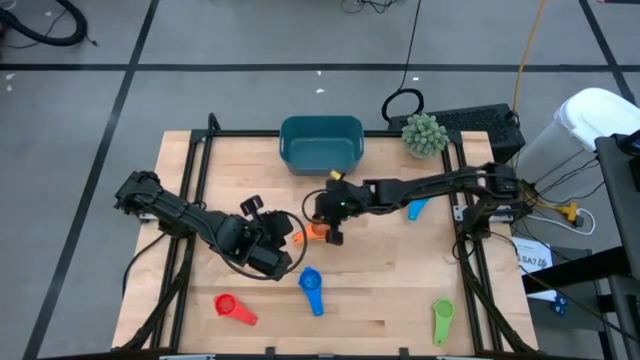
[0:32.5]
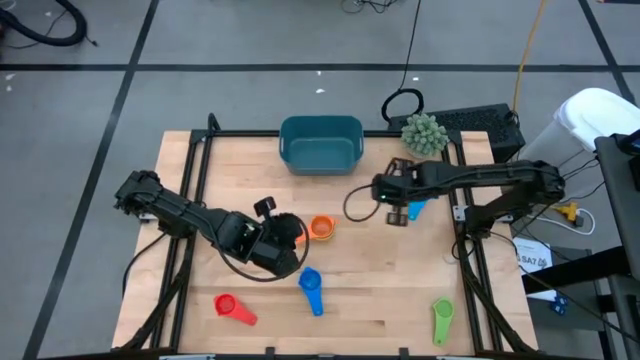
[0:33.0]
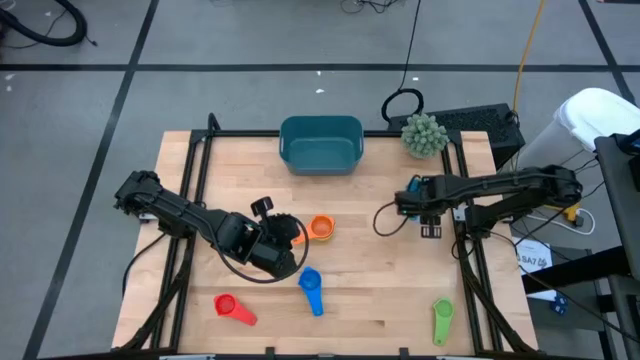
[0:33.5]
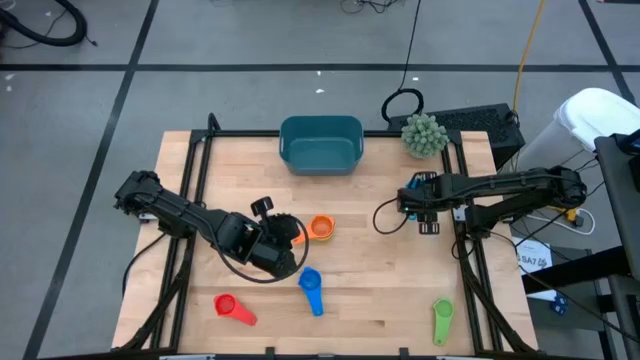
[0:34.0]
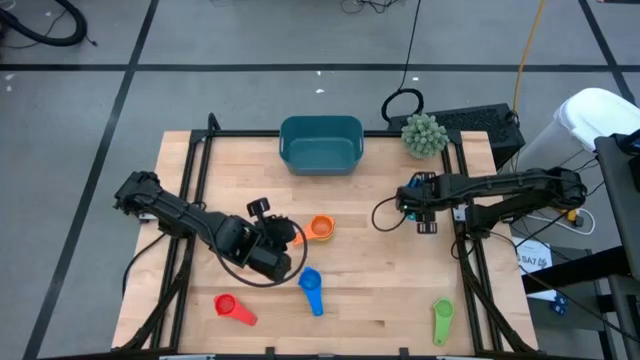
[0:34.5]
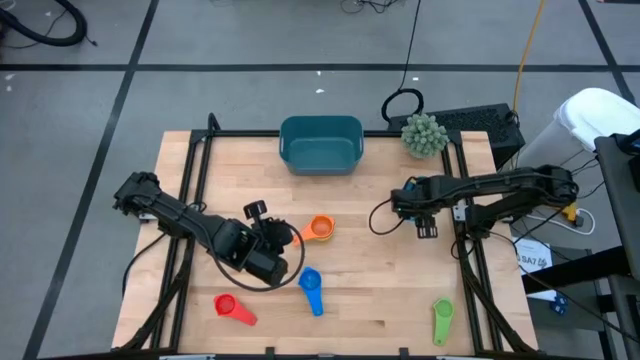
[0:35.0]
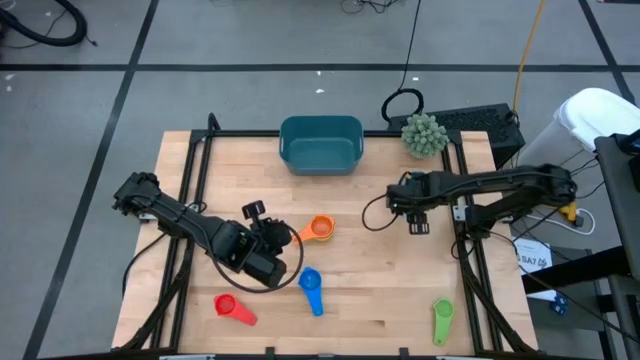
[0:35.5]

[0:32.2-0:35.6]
Task: Nest measuring cups in basket
Move the light blue measuring cup to the center of the table

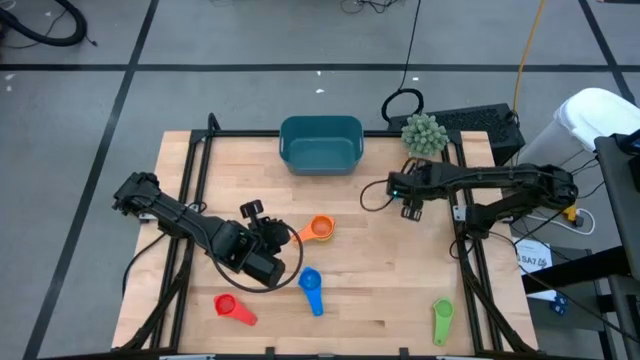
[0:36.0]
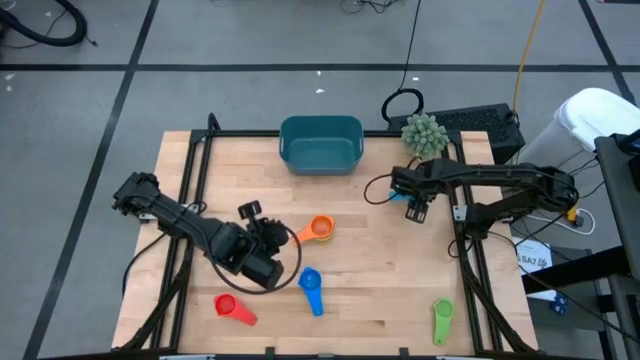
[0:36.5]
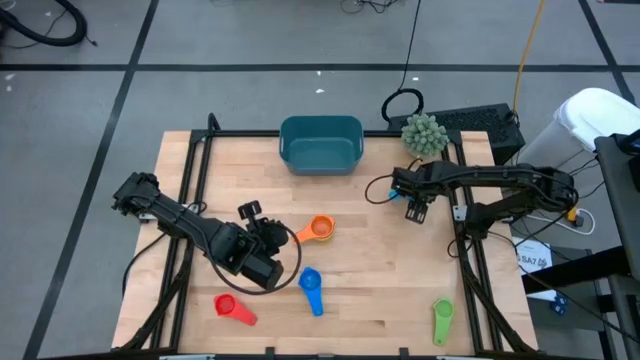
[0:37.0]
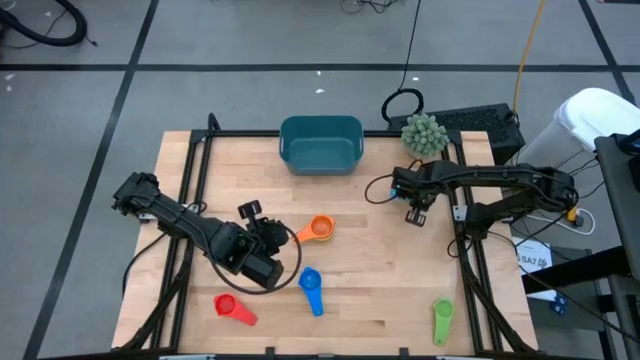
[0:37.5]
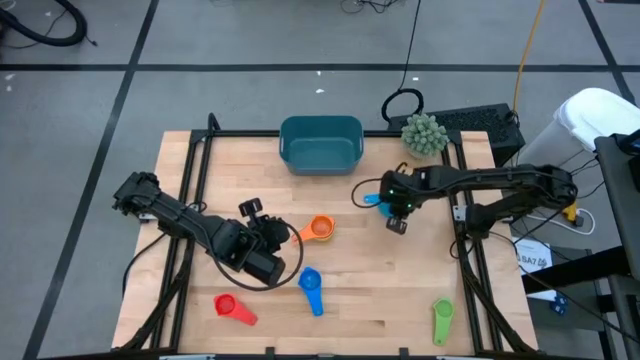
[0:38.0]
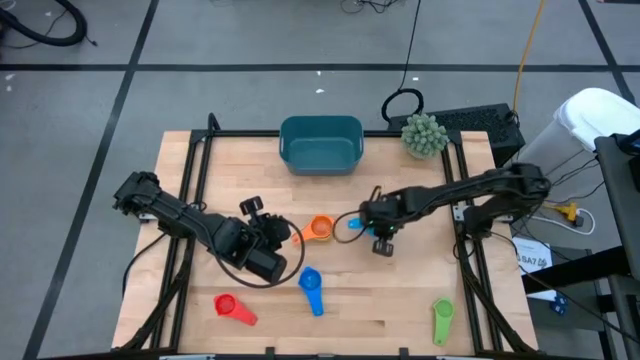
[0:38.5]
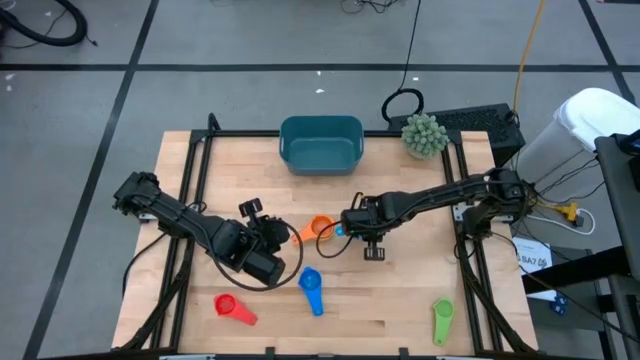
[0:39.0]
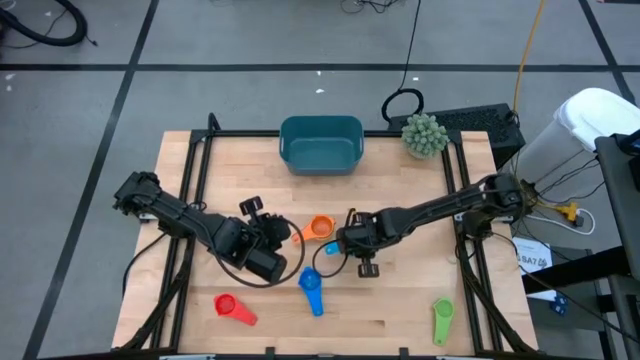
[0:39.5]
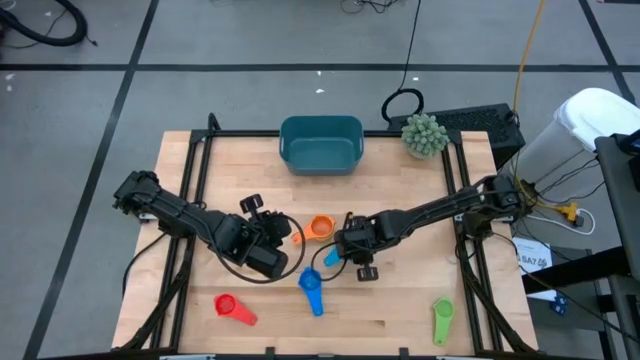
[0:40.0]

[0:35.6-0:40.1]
Move the light blue measuring cup to the center of the table

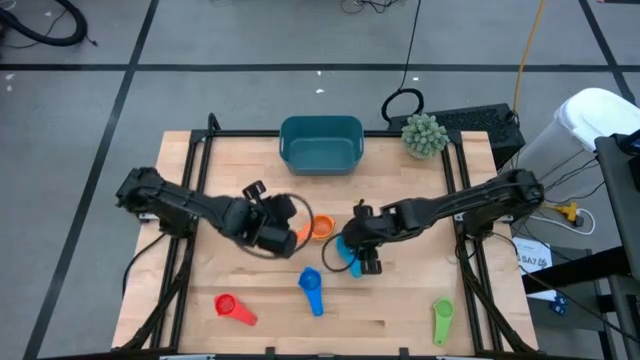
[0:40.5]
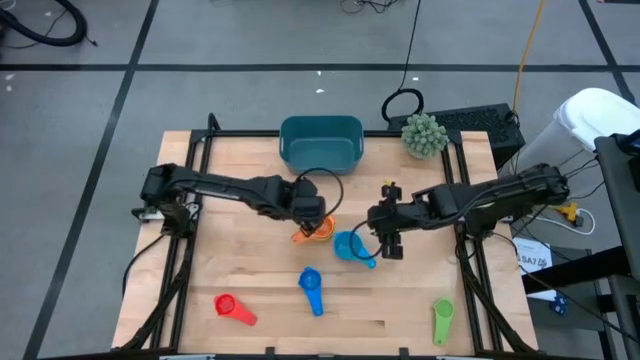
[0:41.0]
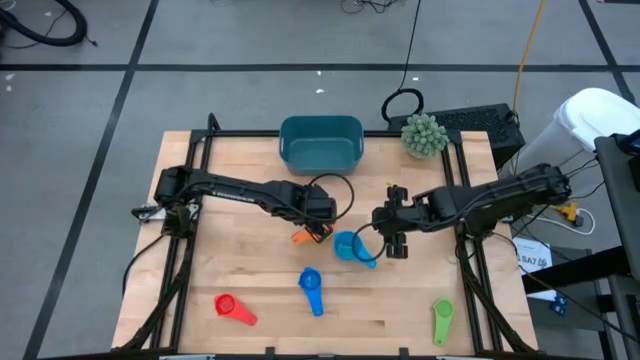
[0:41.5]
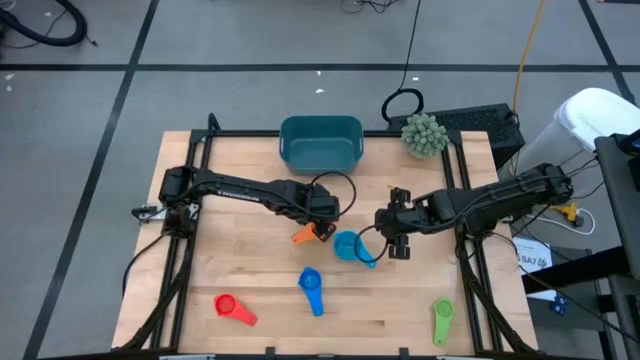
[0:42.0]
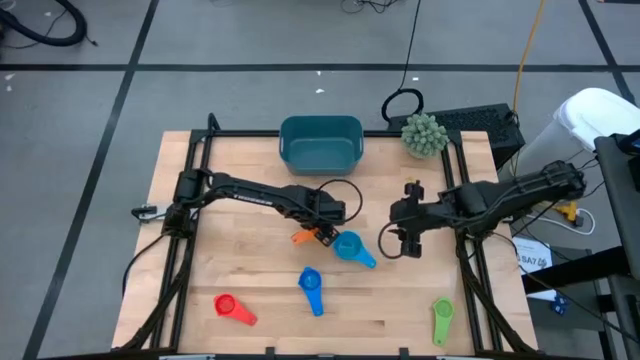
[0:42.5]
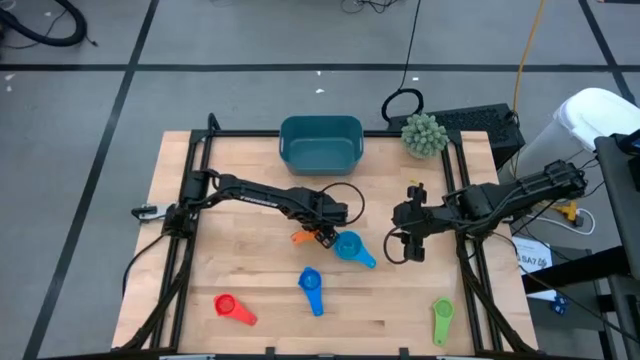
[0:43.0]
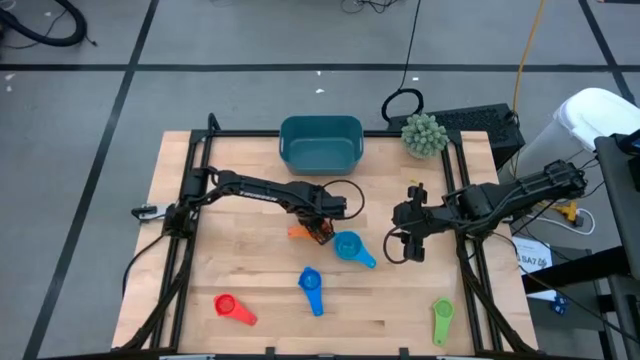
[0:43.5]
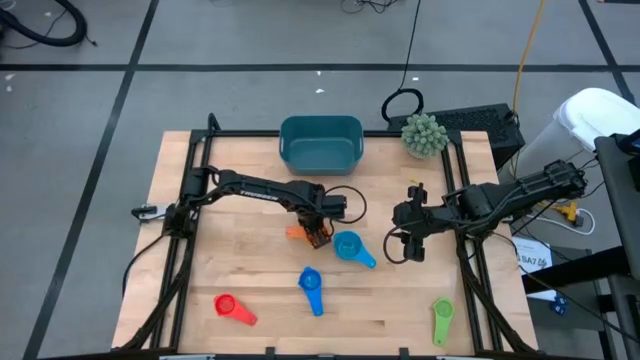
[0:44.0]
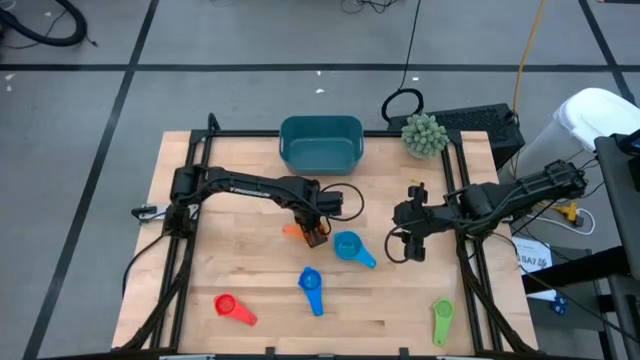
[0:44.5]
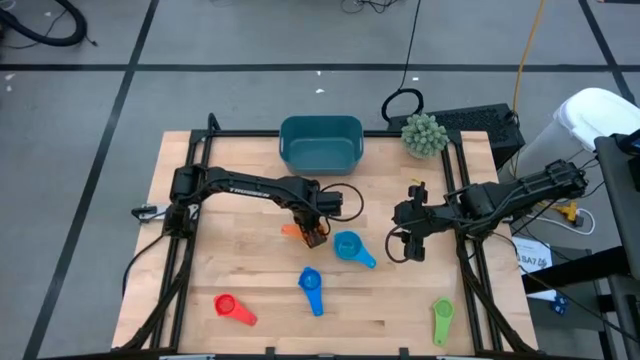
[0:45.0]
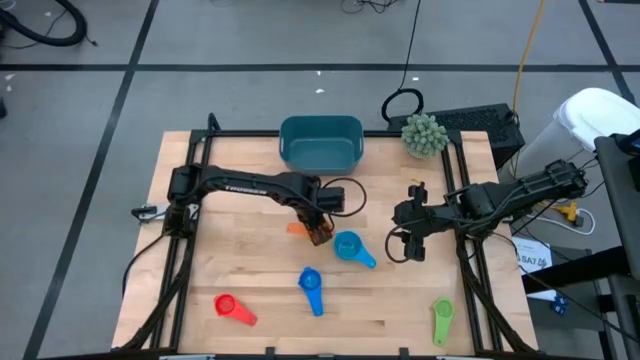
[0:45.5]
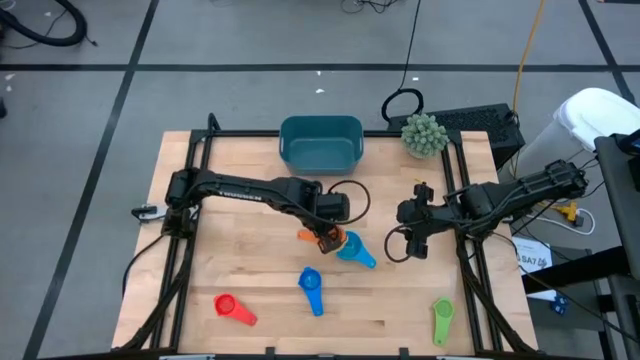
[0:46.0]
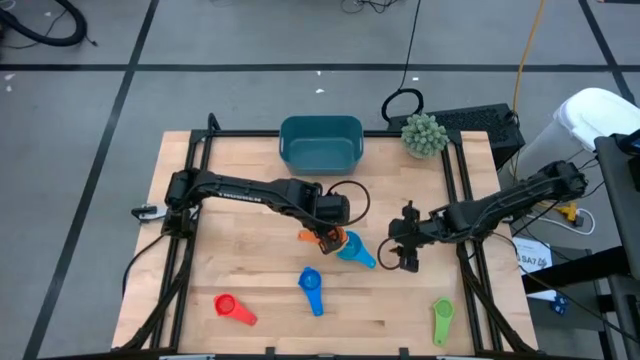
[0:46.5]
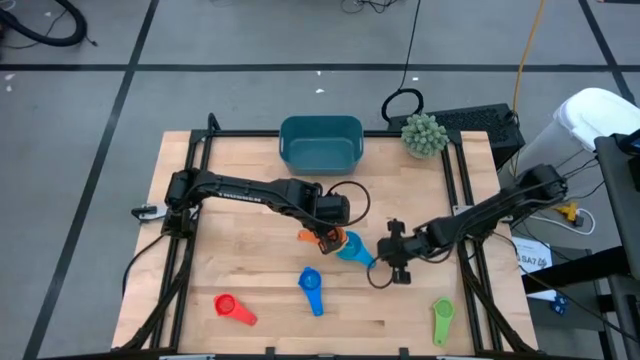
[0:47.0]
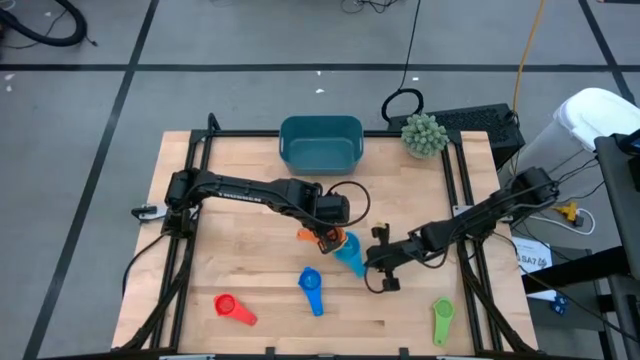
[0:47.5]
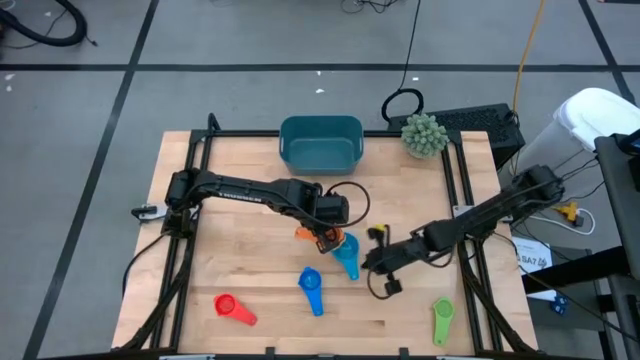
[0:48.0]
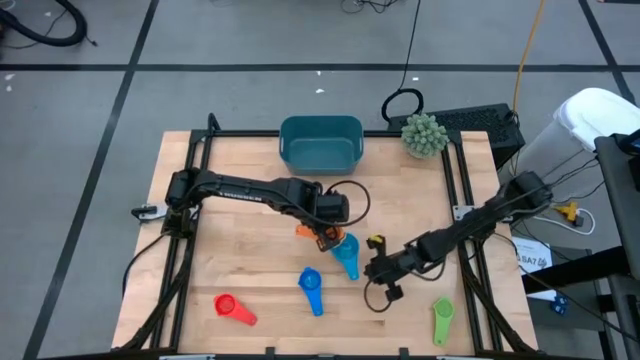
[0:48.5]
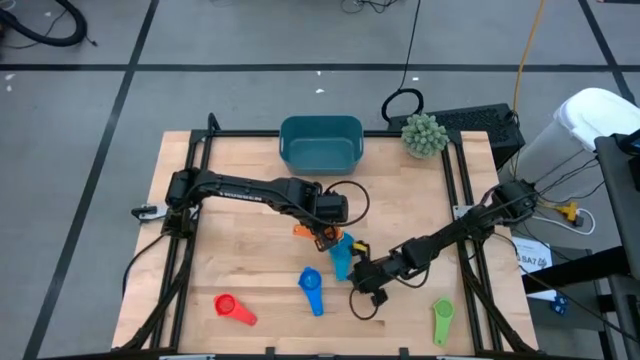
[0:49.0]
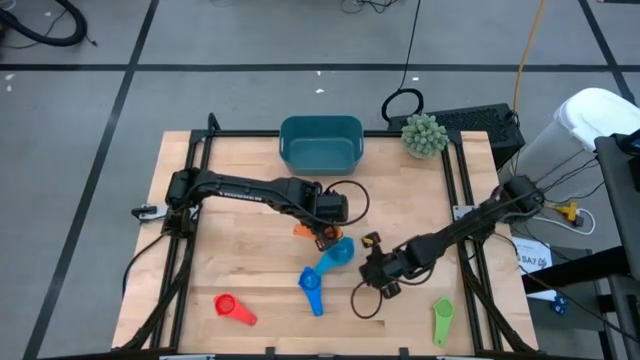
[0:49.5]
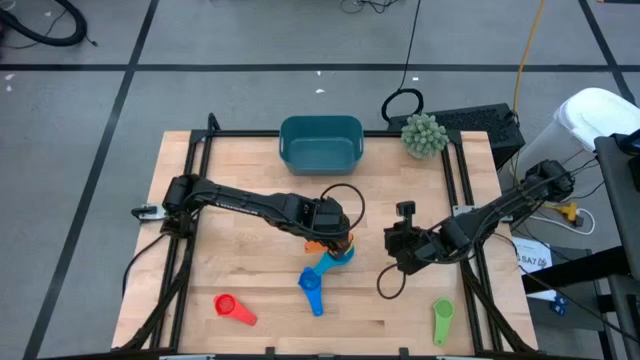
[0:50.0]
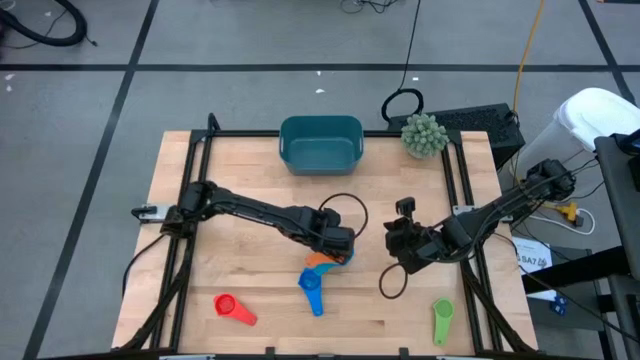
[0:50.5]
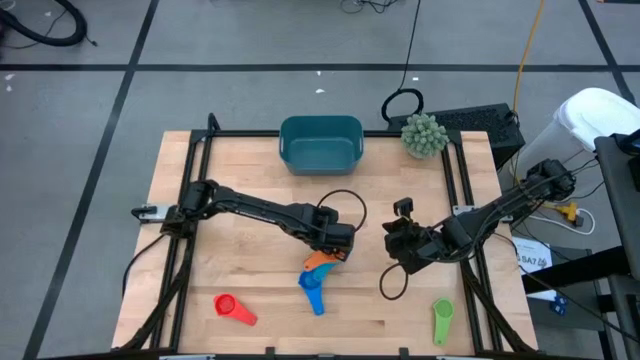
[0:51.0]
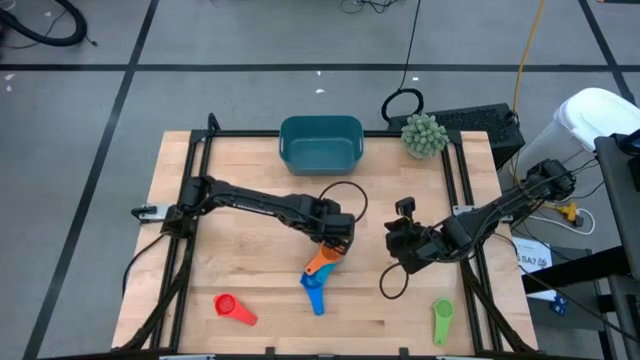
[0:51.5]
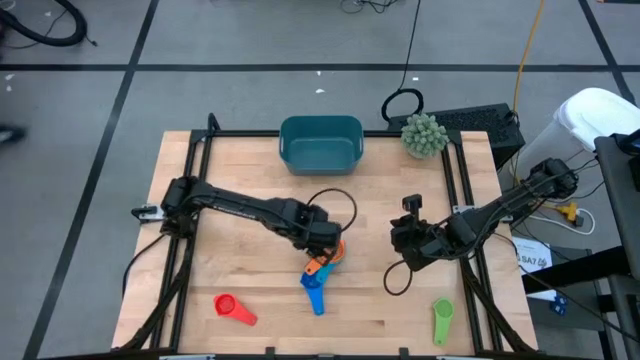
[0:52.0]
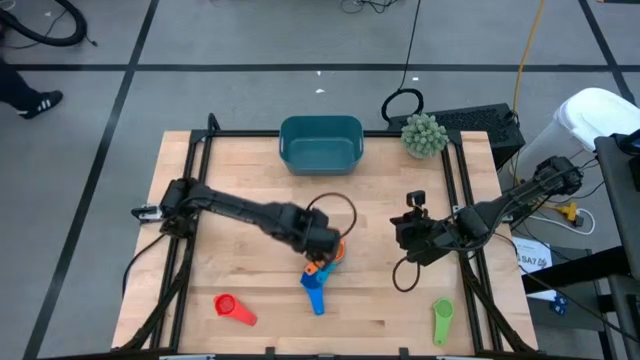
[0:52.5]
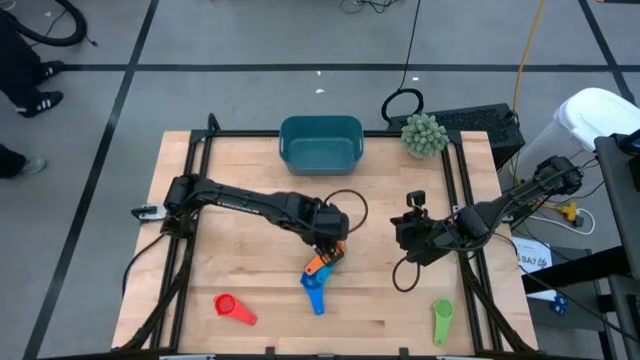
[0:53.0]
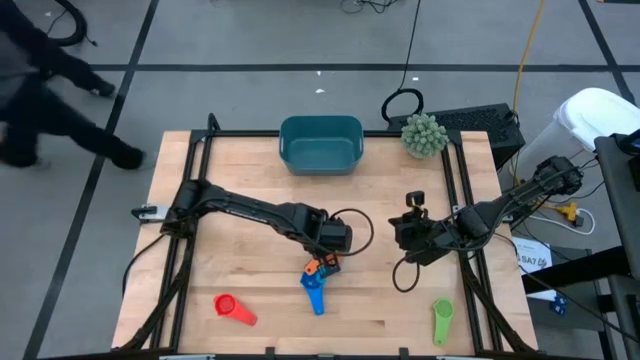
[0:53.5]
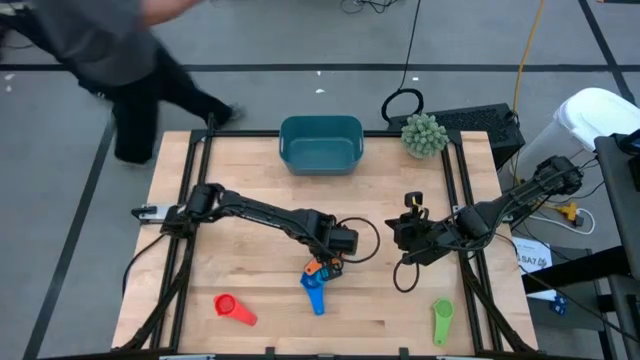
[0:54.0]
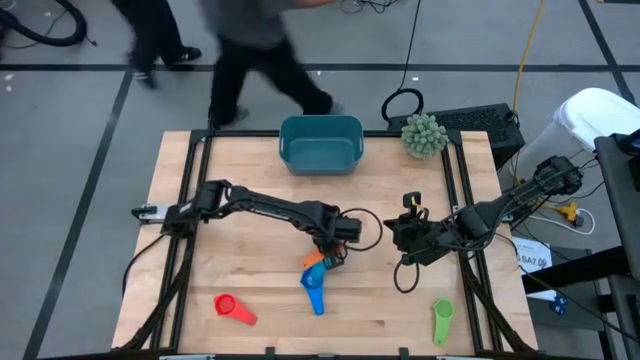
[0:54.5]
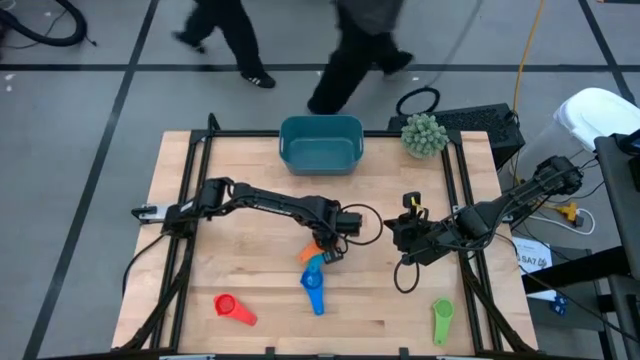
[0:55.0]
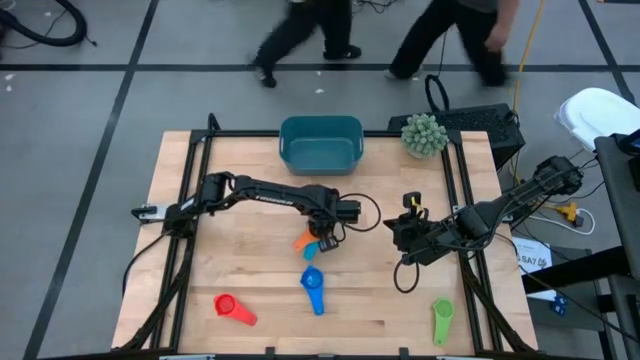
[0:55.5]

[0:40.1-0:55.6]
Stack the nest measuring cups on top of the light blue measuring cup
